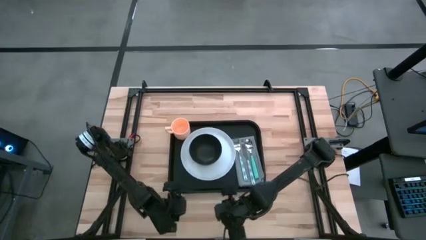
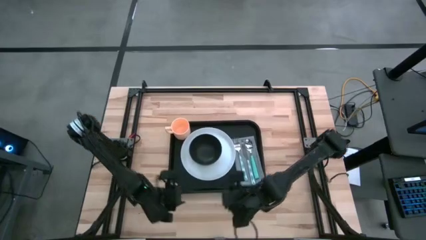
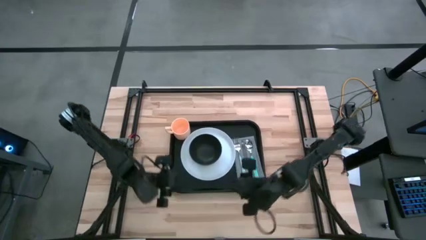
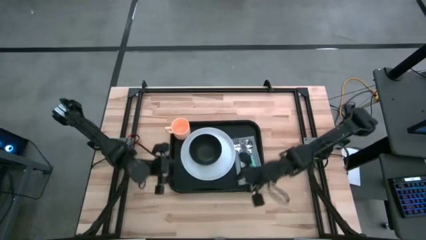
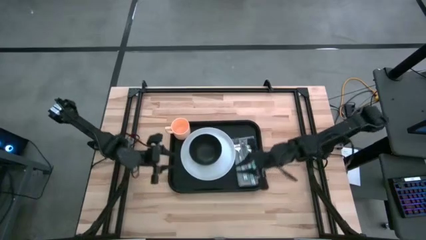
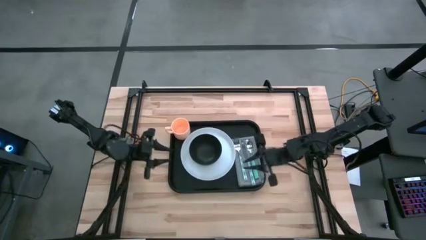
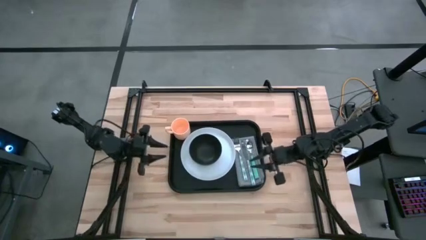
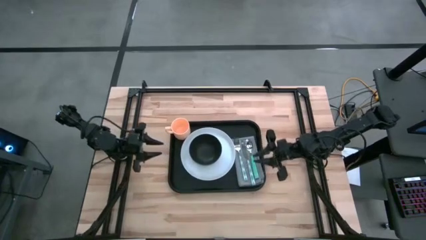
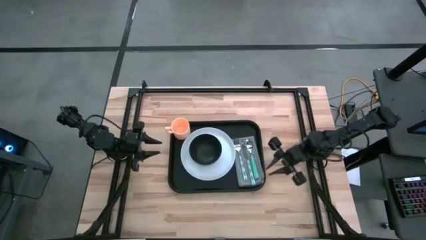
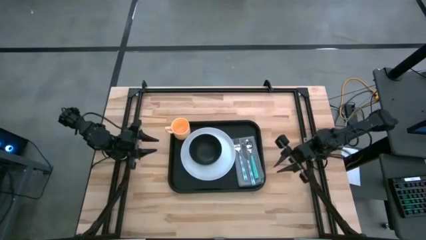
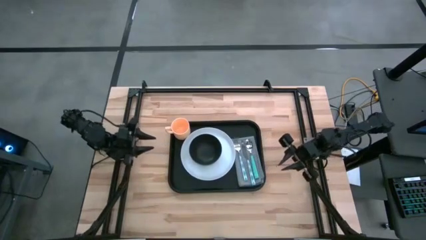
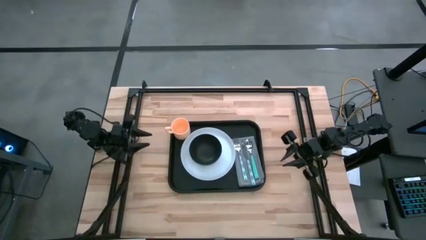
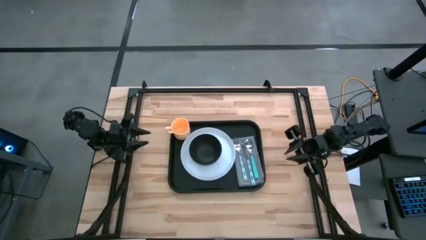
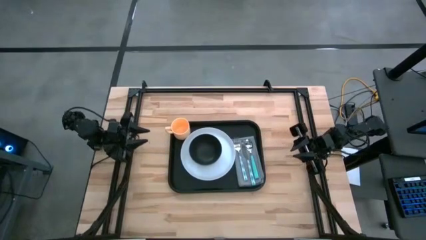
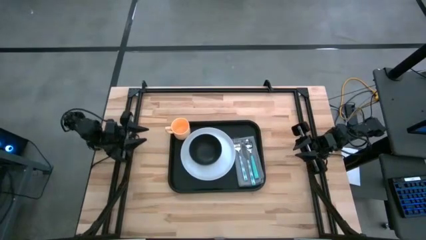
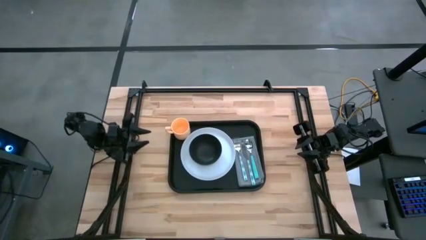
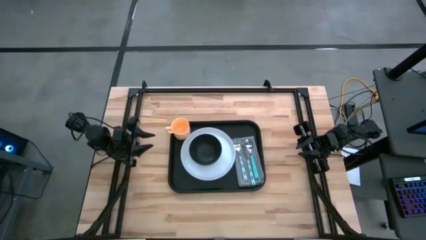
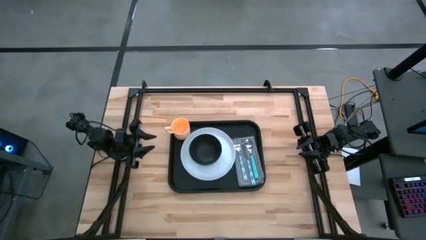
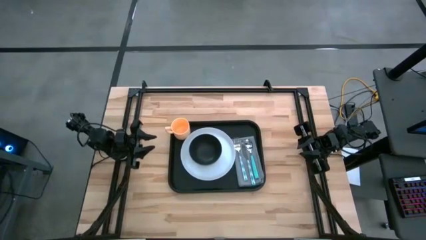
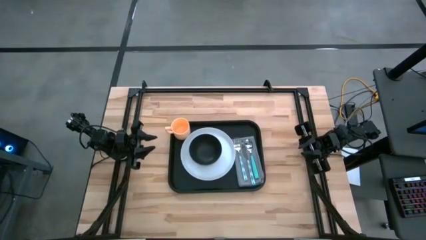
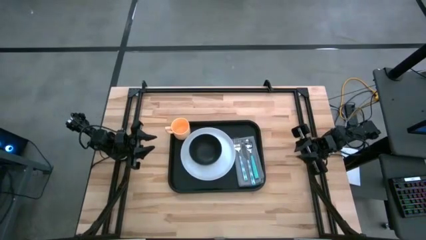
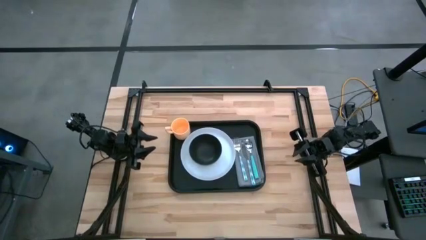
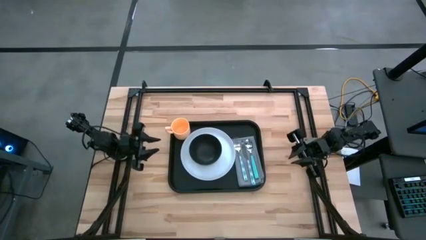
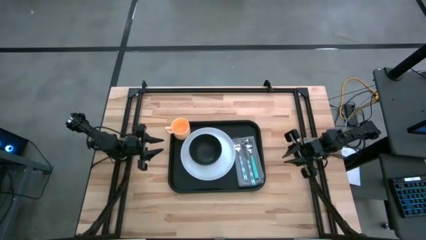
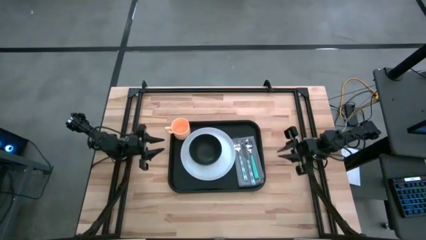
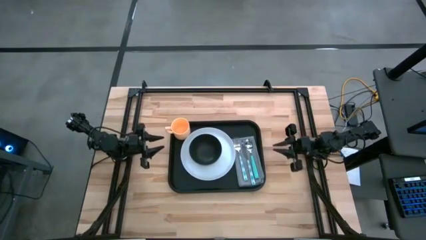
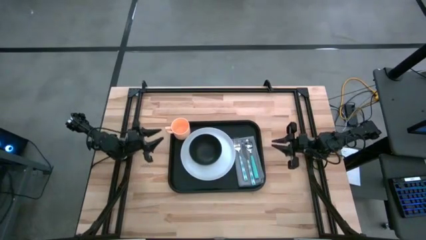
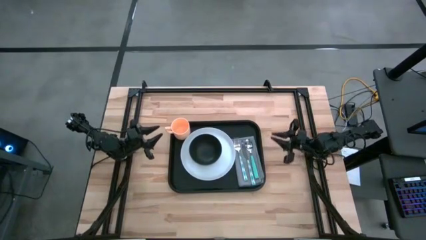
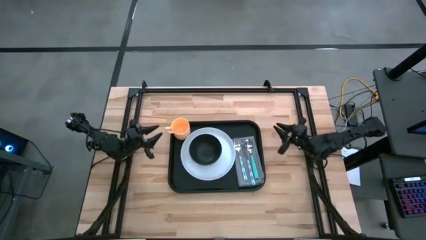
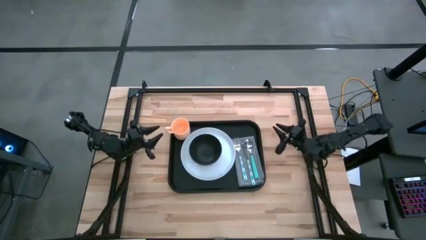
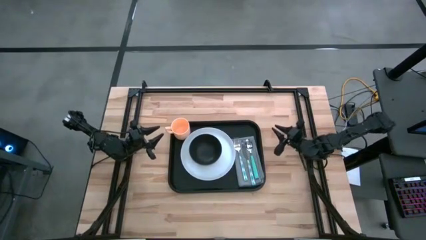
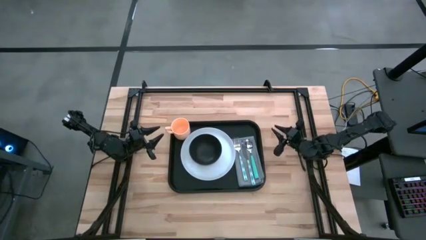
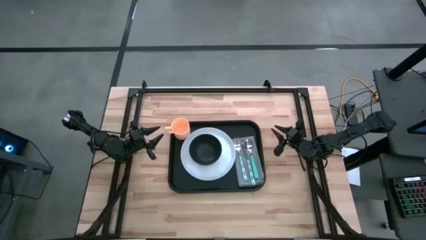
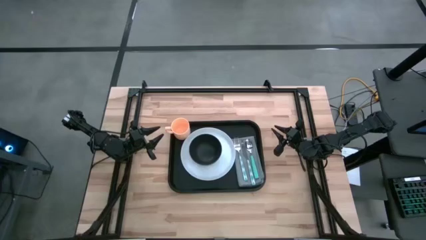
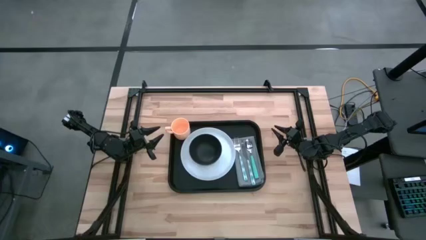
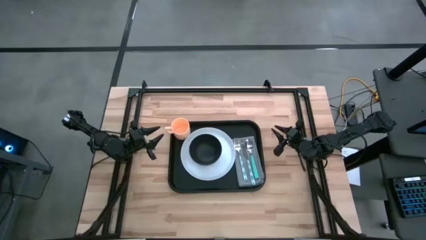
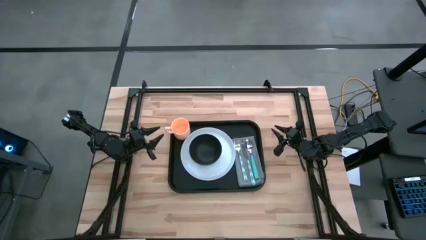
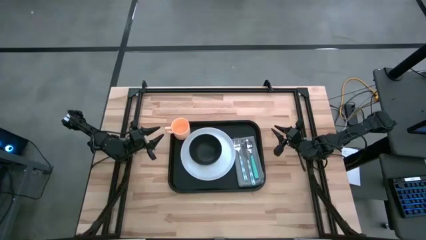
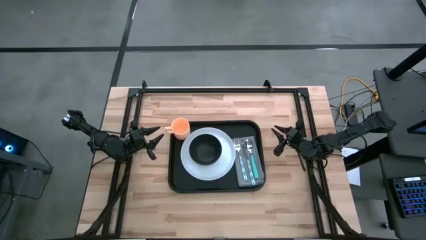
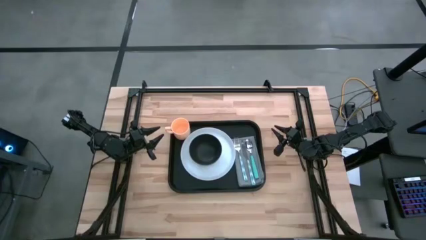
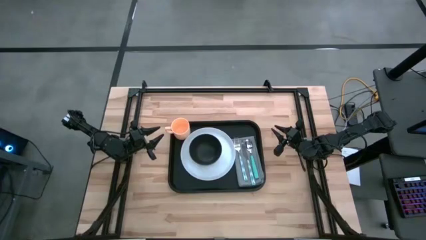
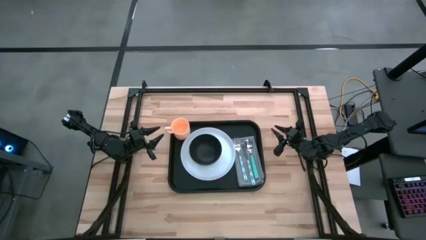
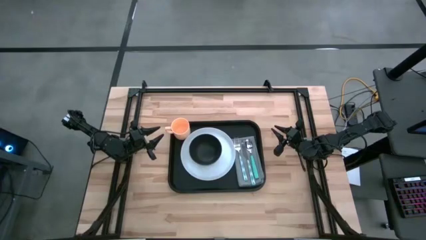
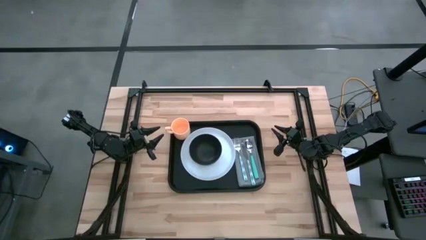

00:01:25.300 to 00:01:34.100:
Task: Set up tray
Return to Home Position

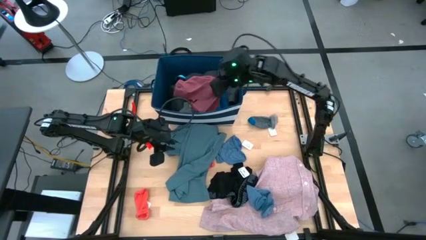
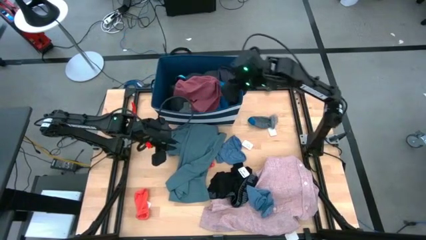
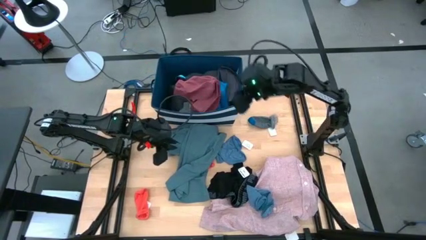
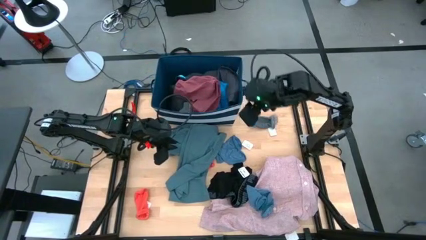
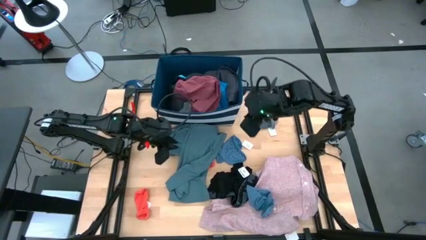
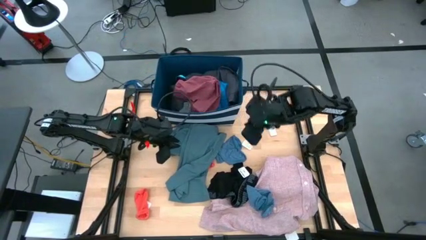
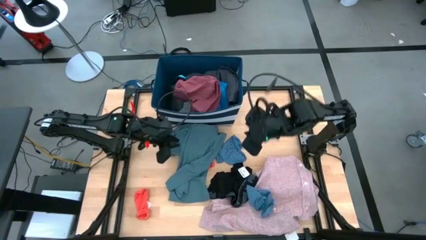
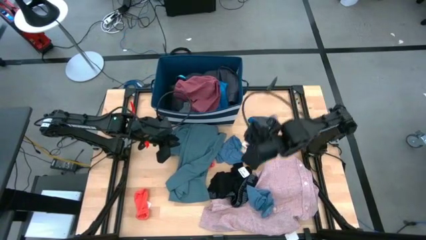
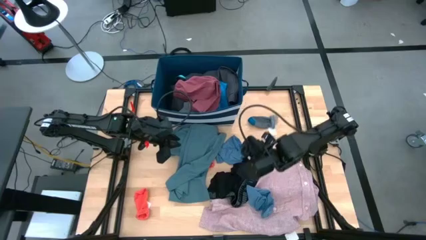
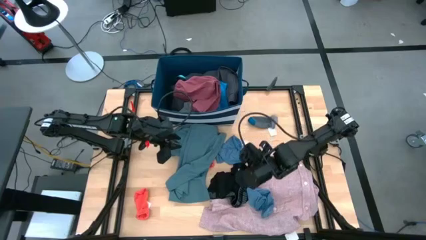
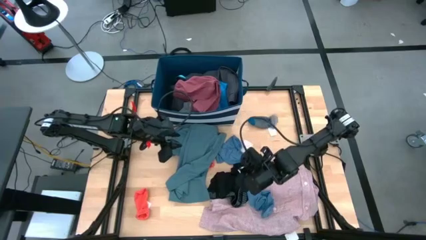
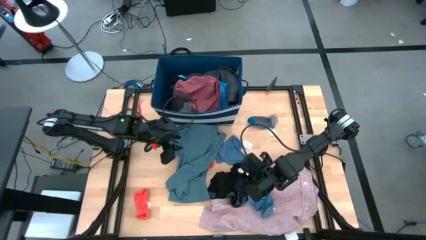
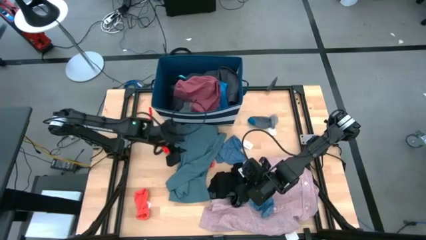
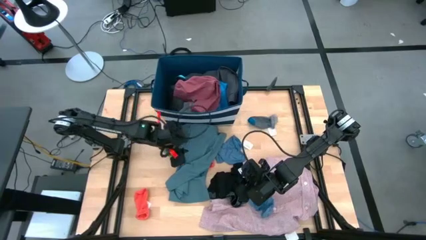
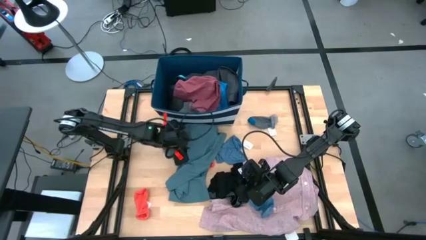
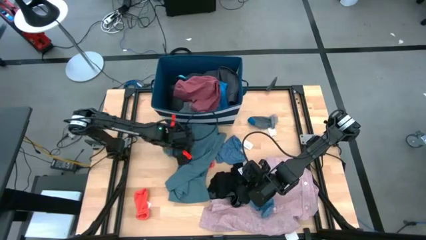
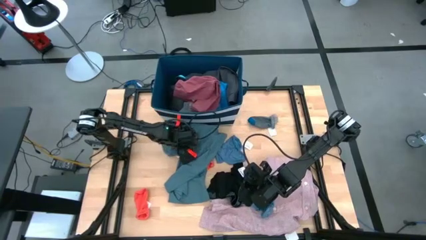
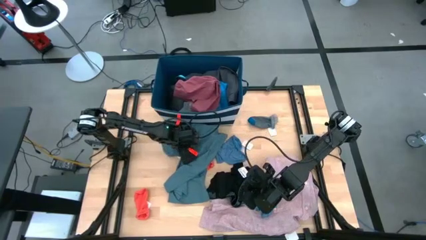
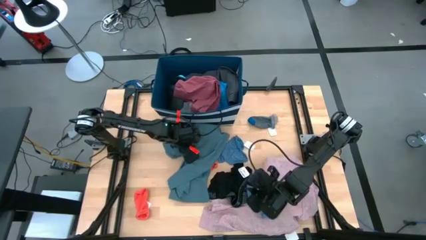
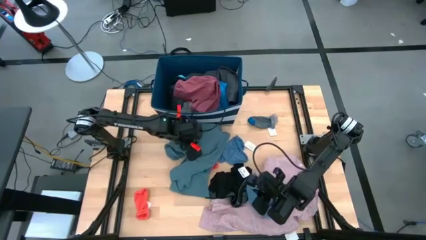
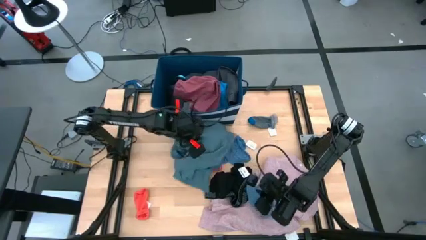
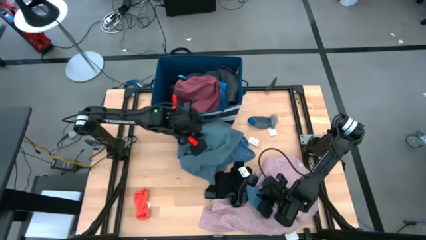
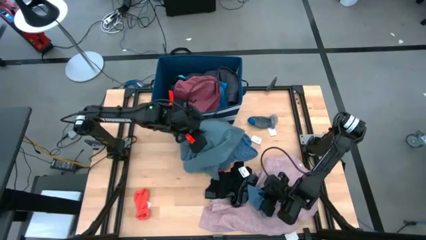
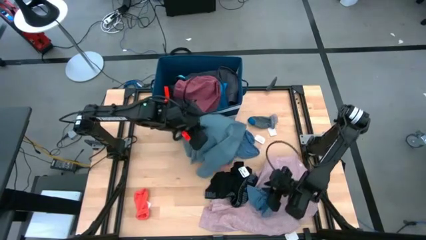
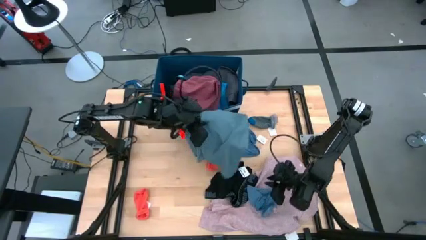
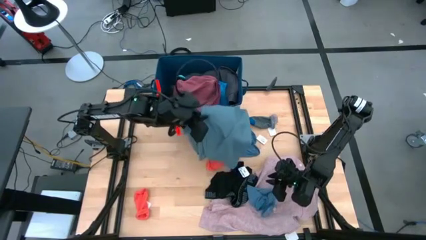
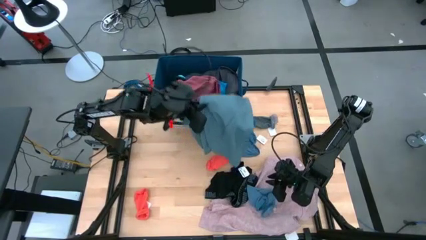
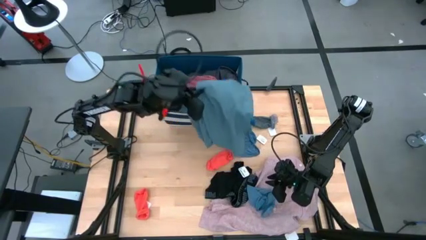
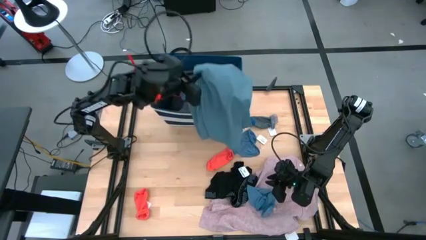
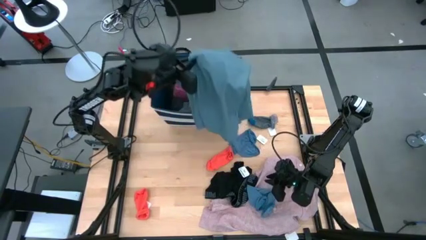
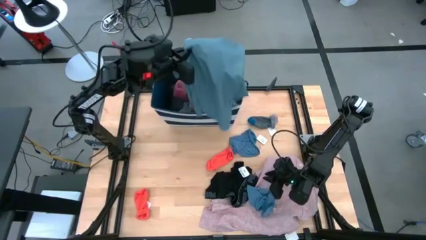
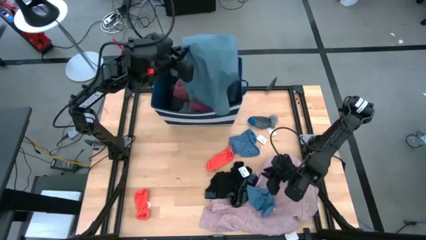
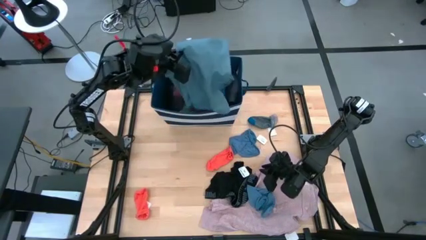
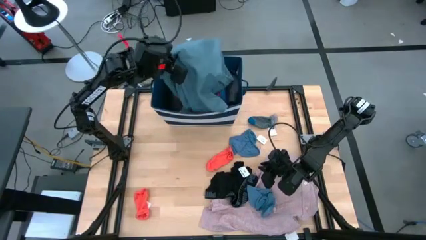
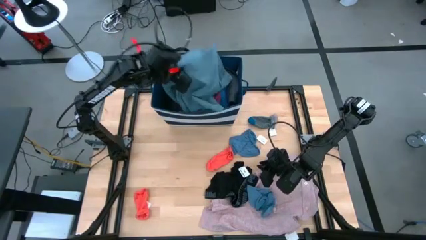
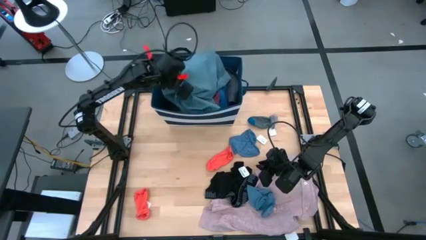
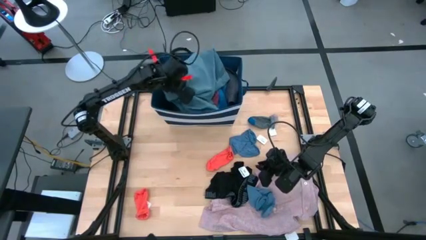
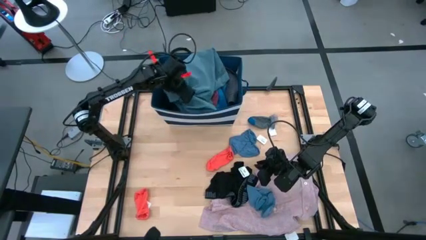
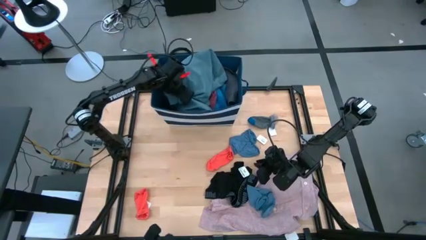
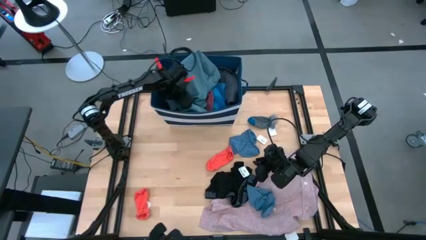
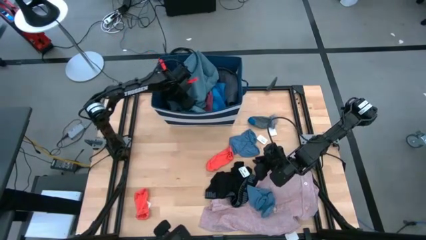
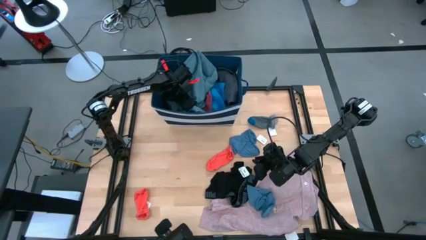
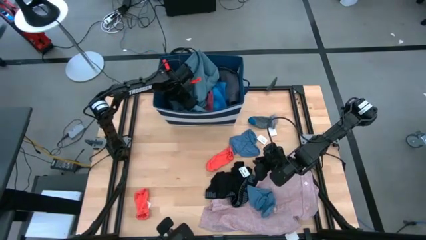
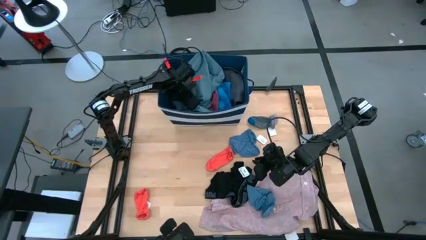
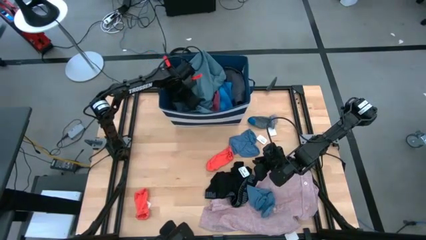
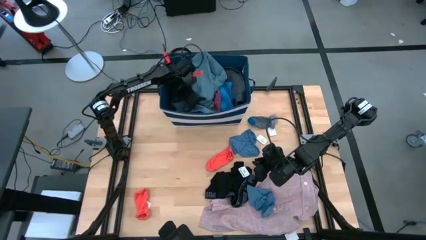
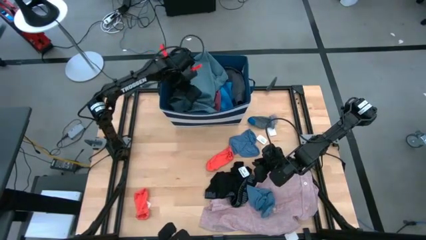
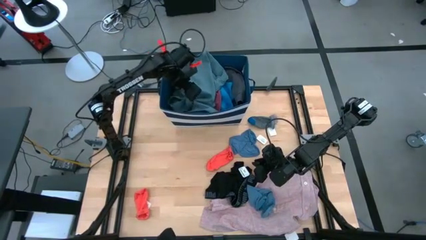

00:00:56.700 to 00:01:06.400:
Task: Sort clothes
Put the blue shorts into the blue bin
